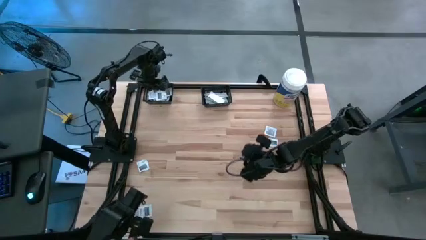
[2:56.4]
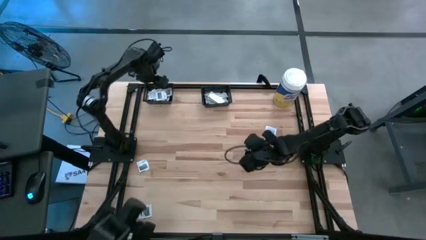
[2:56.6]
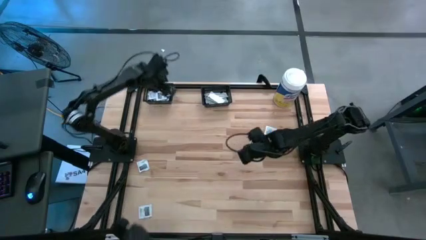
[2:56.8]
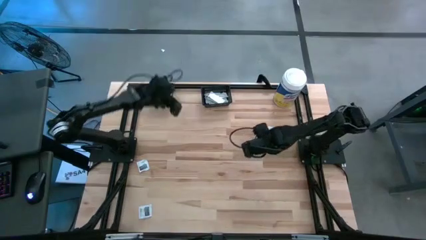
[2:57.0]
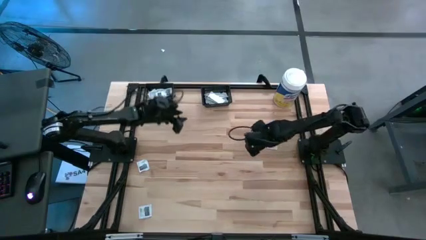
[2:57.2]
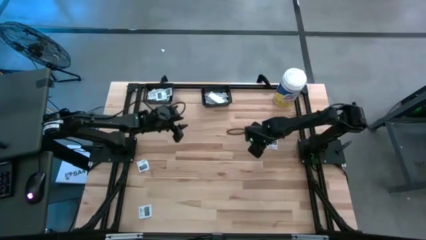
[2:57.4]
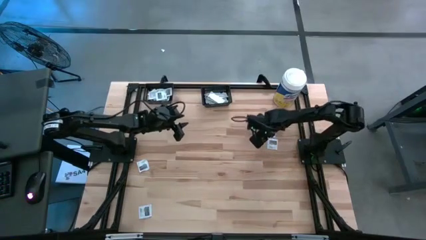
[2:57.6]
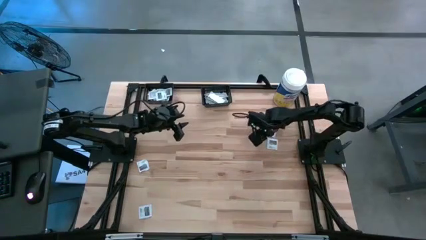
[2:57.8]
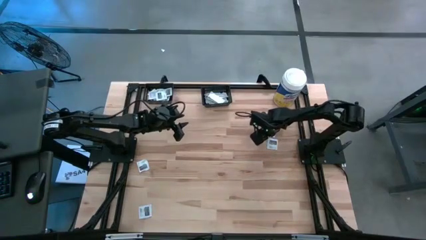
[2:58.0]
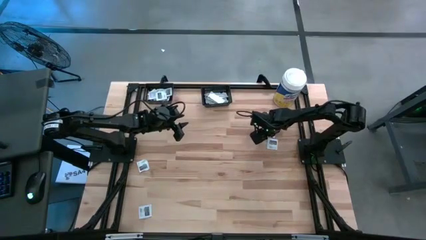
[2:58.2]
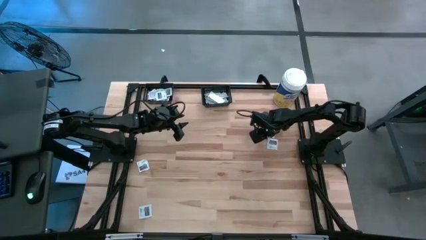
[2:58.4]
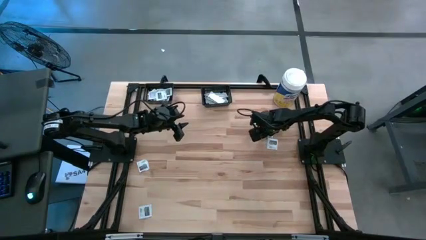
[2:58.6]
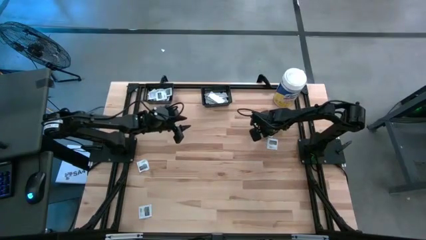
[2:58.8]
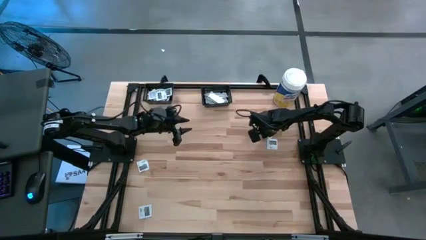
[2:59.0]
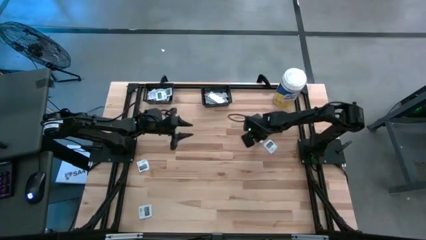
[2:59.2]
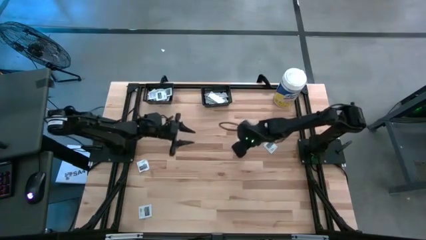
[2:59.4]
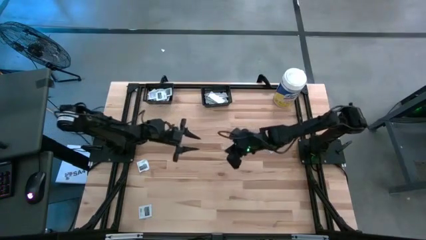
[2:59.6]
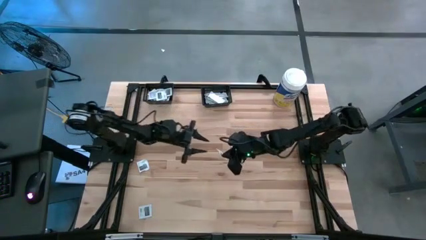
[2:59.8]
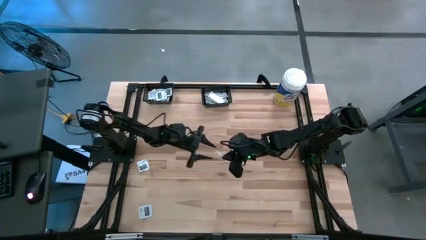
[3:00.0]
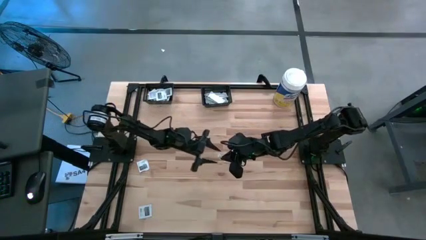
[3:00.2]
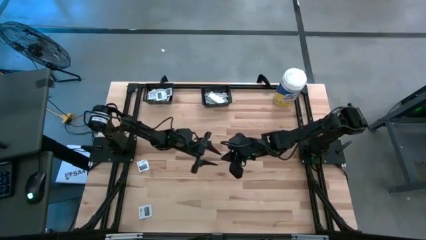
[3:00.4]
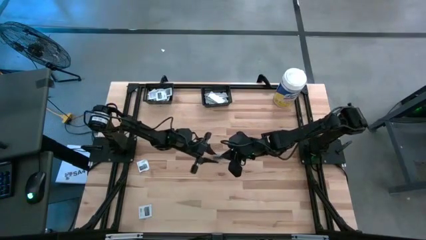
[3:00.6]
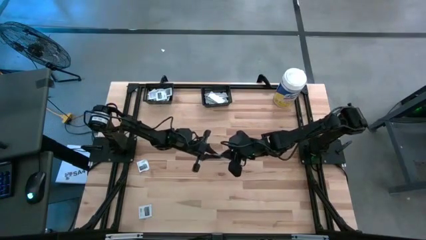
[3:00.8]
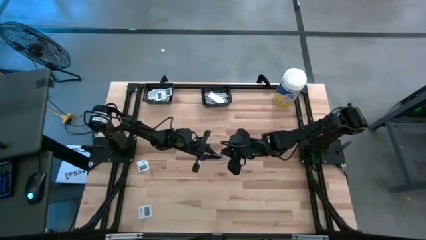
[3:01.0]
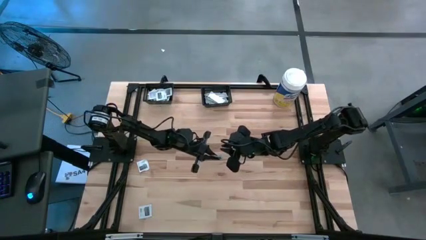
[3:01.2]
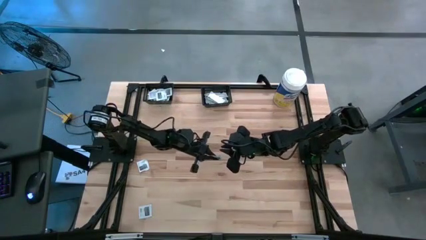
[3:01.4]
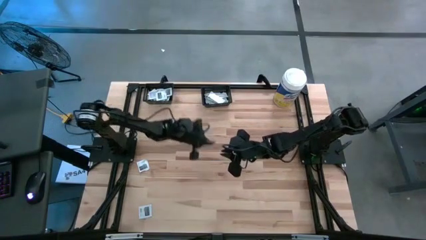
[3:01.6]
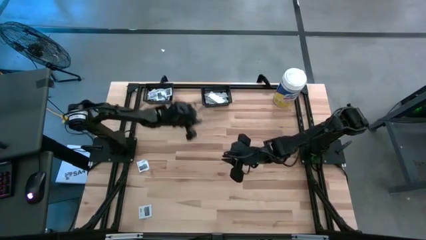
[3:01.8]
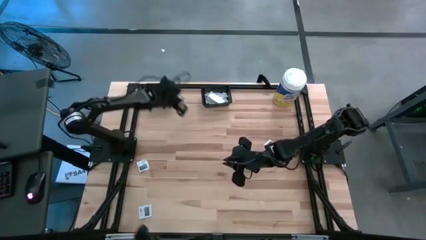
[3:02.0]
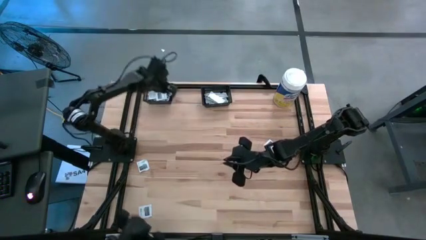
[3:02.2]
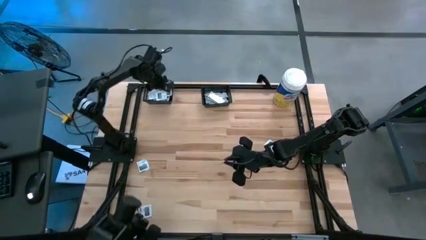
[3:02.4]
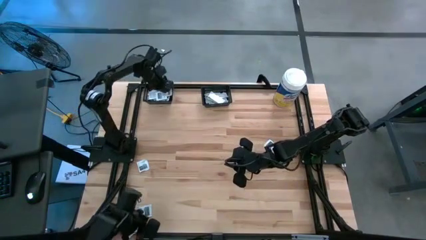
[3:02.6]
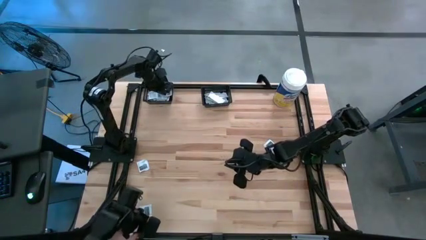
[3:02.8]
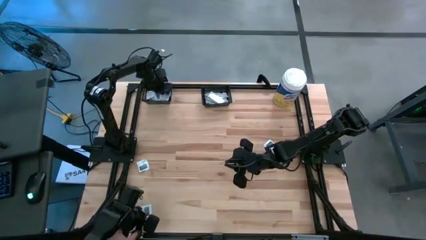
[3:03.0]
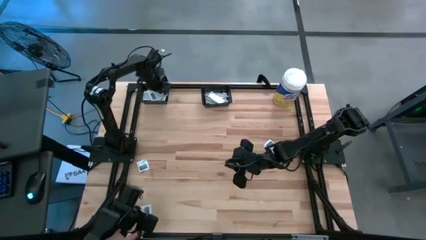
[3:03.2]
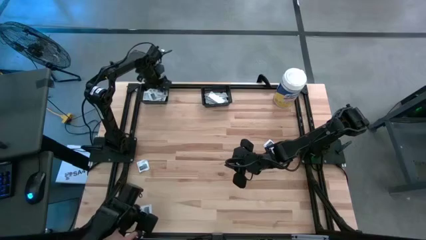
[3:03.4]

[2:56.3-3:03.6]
Task: Pick & Place First Aid Supplies
Put the gray towelette pack into the left black bin

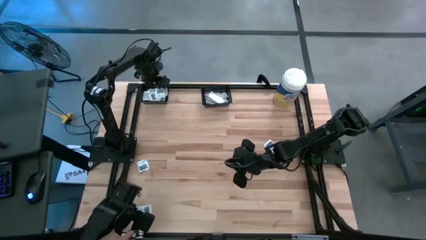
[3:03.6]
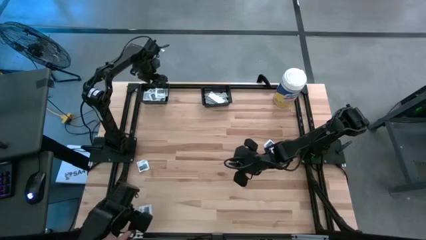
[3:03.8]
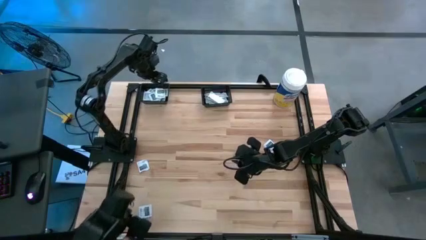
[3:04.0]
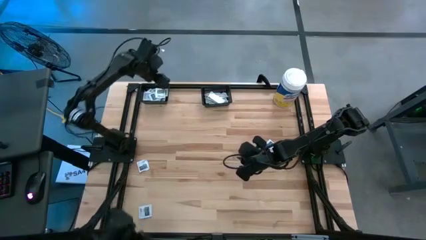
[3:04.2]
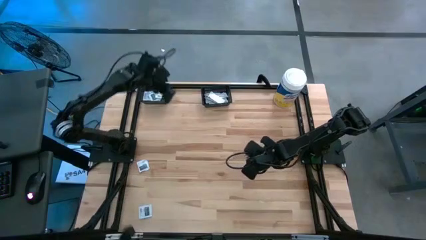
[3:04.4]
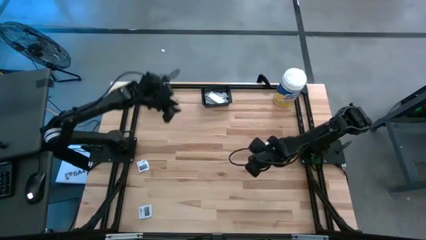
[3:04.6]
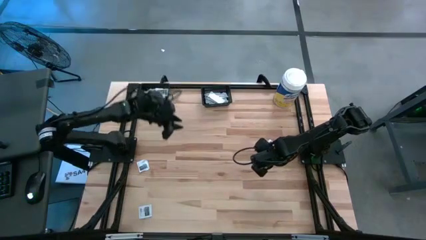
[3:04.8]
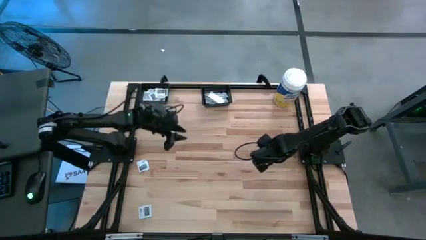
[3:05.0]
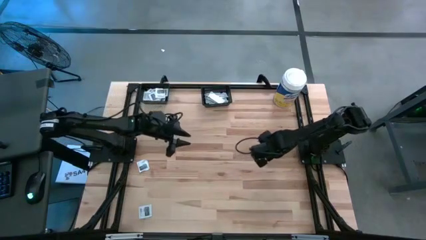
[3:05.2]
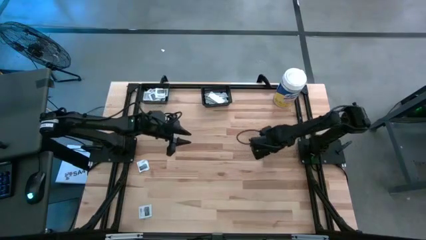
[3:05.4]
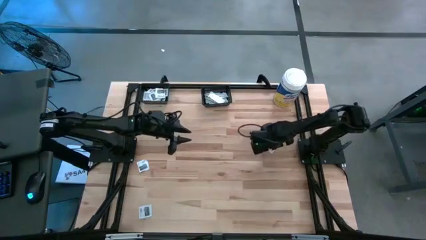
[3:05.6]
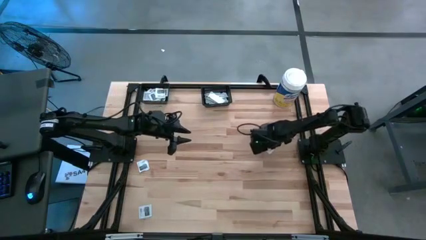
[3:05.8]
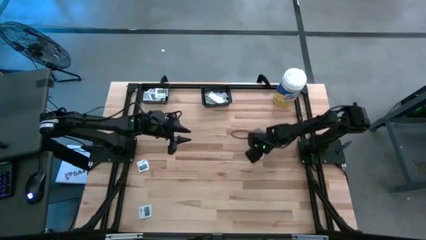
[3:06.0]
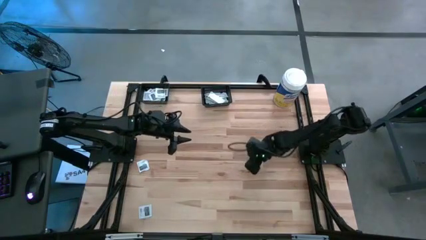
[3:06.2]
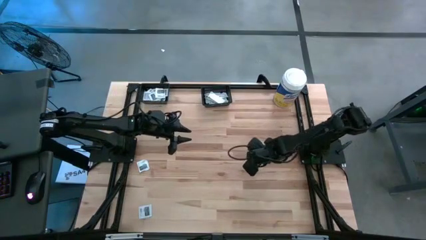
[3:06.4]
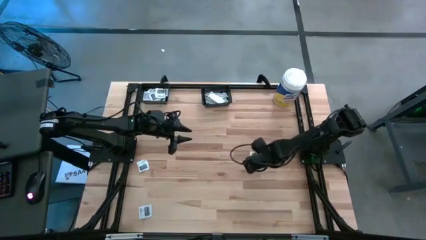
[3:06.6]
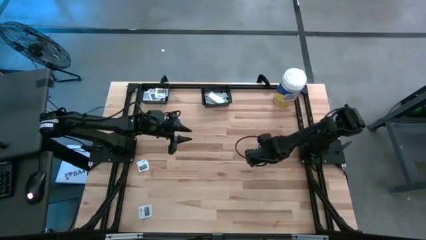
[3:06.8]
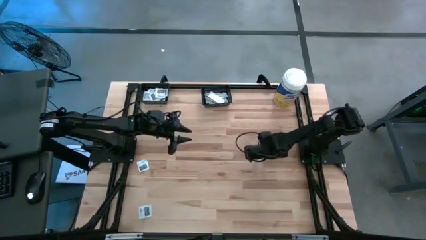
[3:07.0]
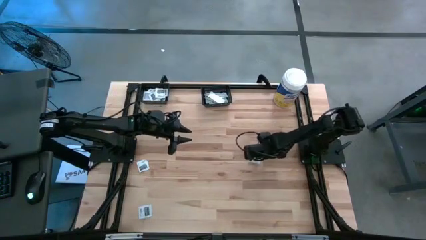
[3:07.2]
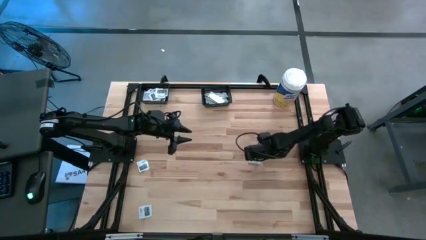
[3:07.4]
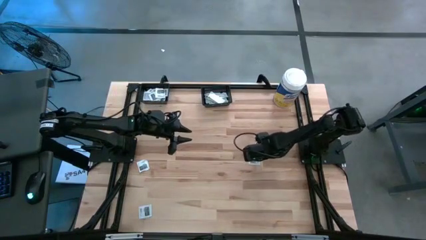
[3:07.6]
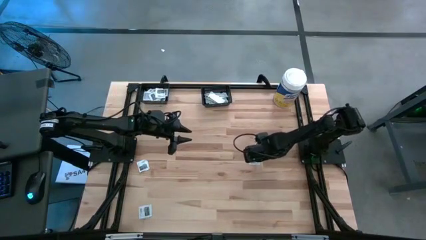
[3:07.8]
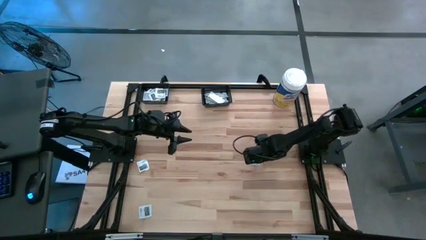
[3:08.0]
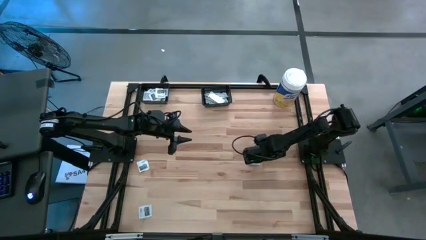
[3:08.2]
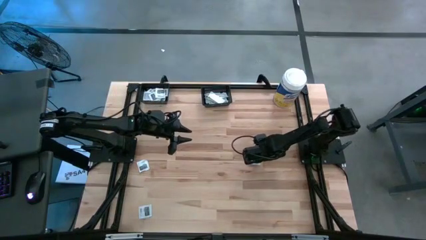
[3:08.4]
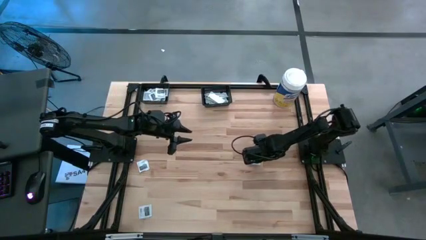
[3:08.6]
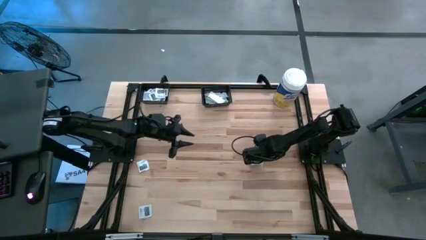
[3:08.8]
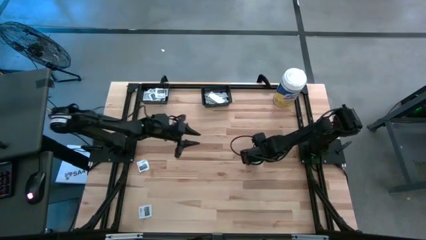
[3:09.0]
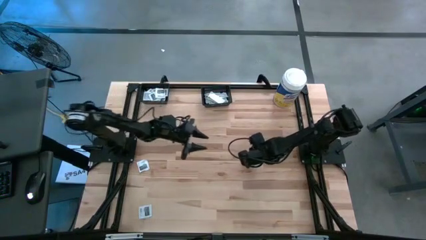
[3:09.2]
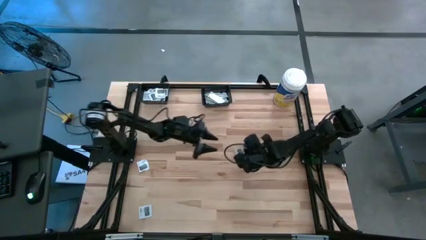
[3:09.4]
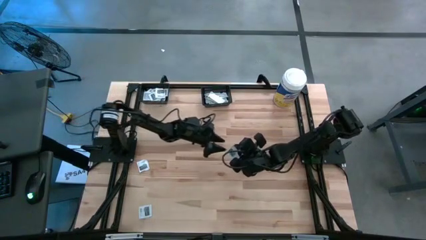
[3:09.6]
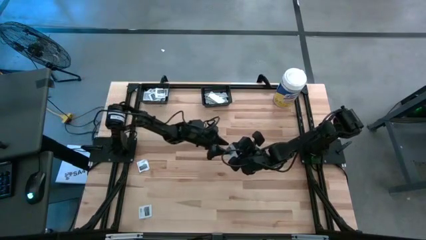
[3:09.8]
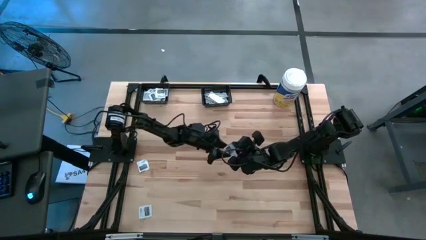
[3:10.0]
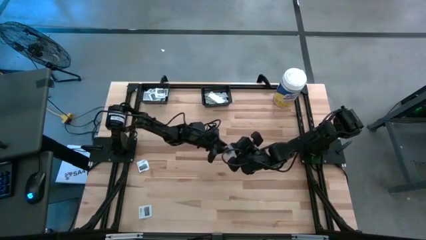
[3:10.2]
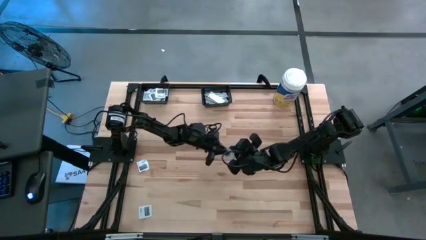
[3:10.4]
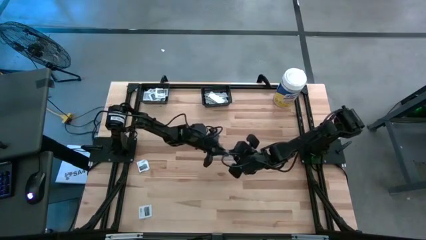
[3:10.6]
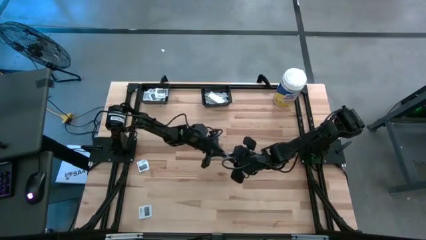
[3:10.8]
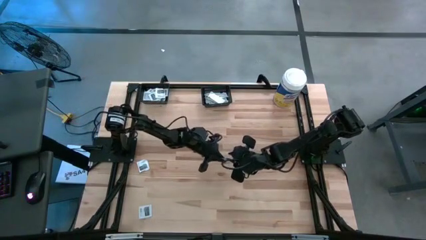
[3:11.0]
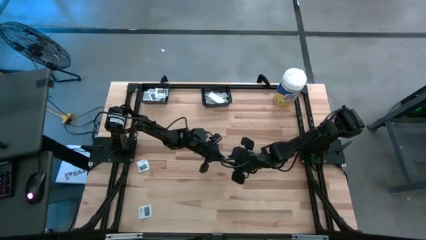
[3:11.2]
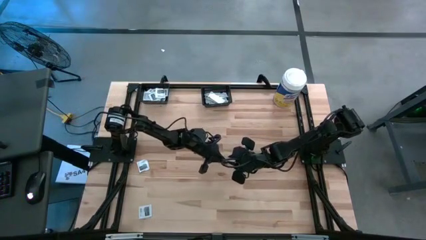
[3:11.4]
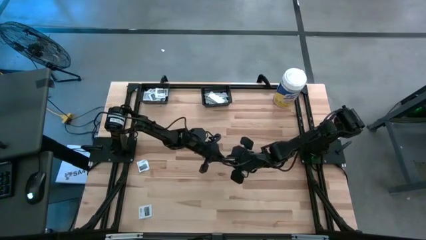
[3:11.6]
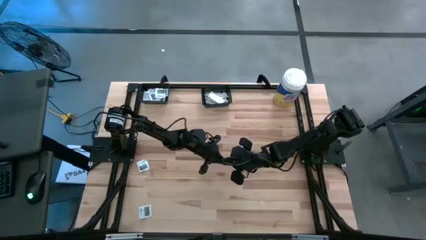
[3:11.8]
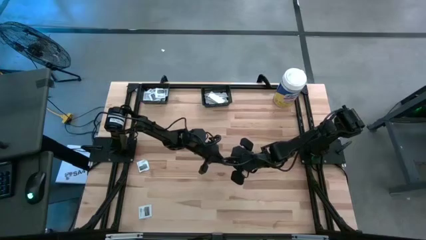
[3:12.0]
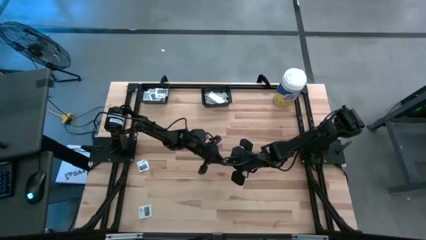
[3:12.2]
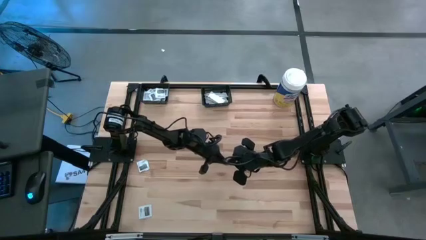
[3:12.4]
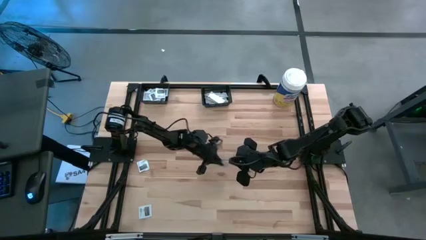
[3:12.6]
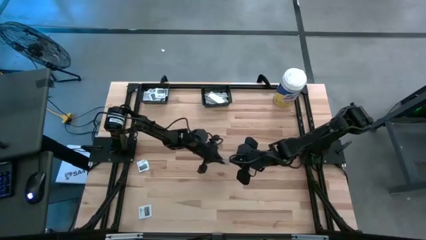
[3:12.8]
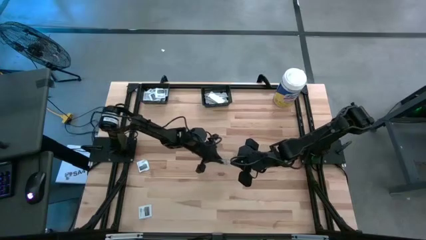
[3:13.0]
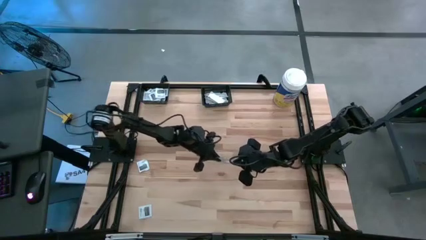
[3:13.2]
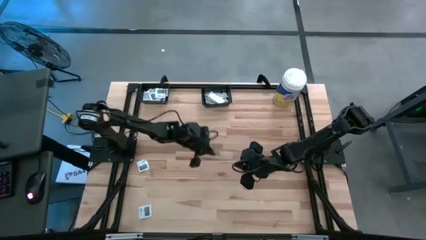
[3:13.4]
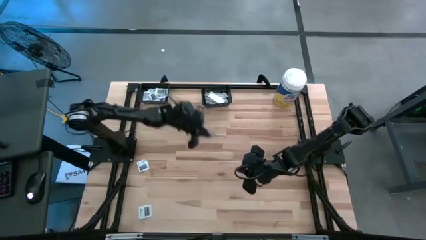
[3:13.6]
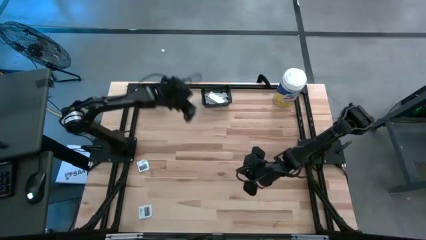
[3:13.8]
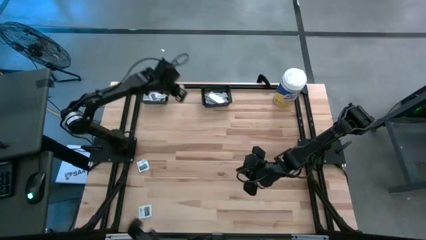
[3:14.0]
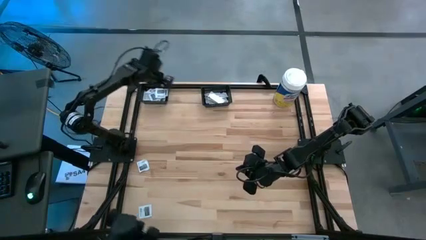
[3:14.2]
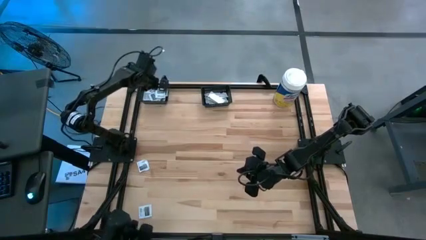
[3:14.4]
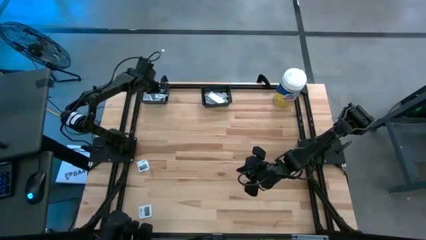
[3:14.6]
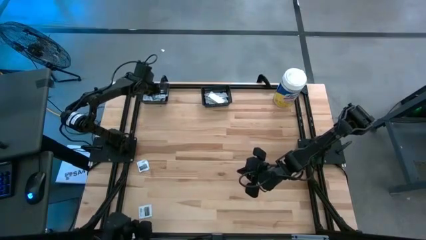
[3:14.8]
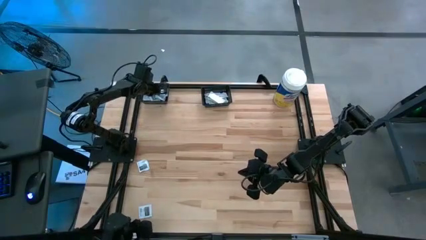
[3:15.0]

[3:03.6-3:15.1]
Put the gray towelette pack into the left black bin
